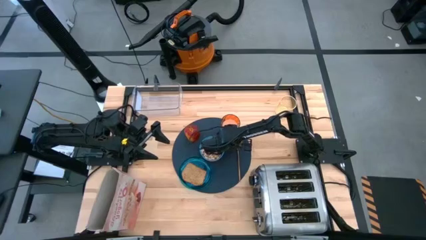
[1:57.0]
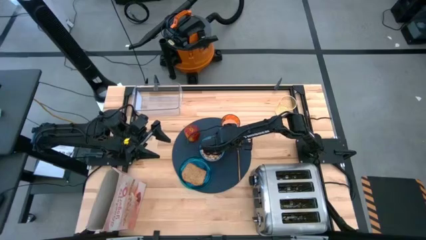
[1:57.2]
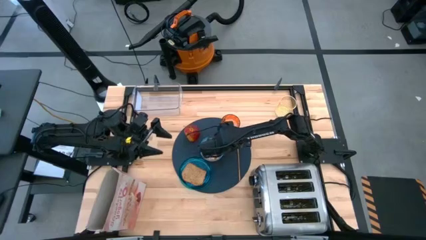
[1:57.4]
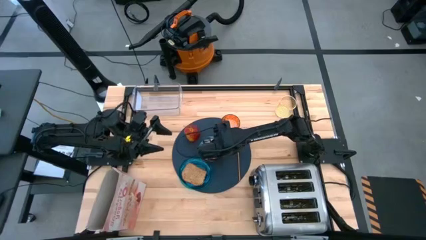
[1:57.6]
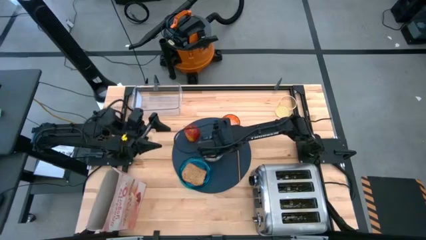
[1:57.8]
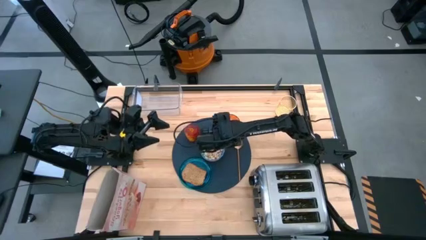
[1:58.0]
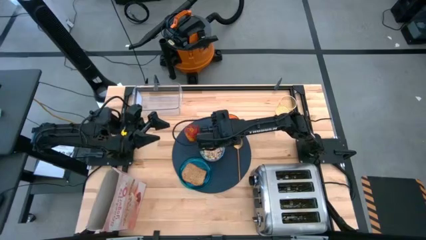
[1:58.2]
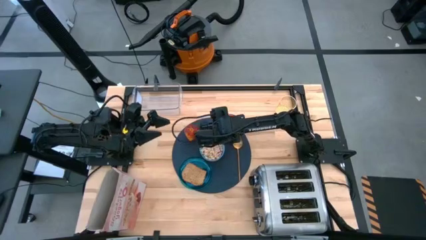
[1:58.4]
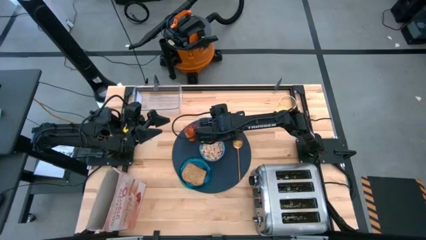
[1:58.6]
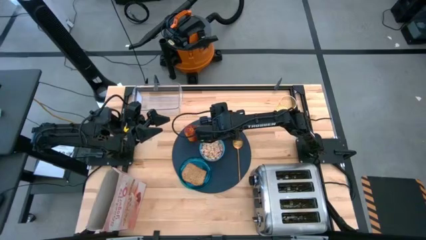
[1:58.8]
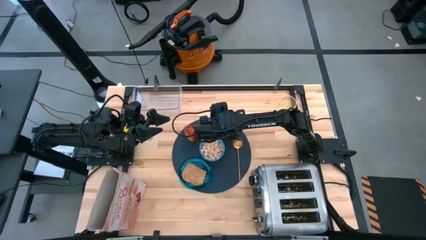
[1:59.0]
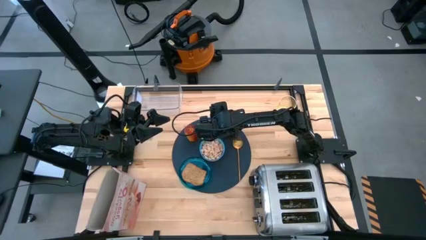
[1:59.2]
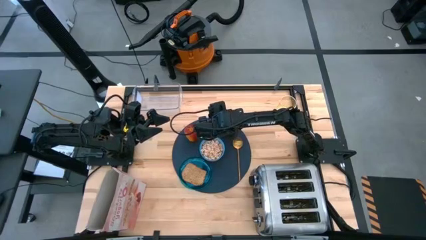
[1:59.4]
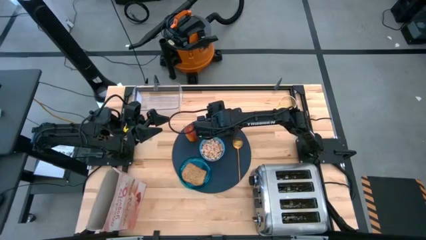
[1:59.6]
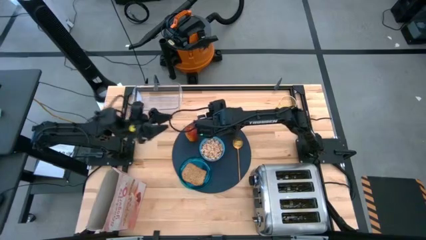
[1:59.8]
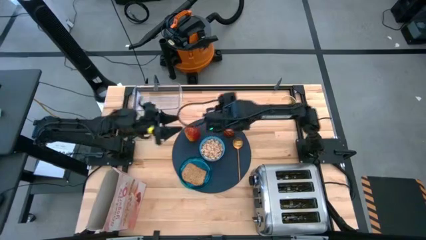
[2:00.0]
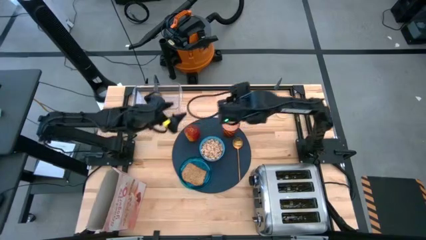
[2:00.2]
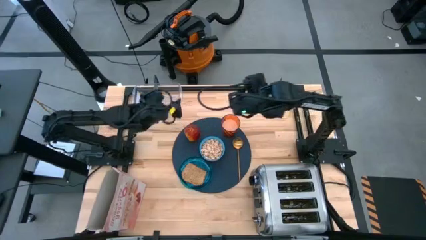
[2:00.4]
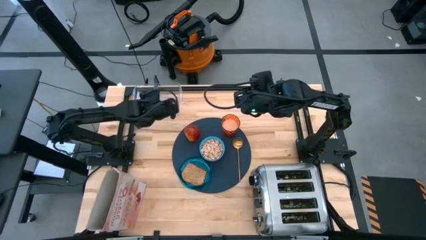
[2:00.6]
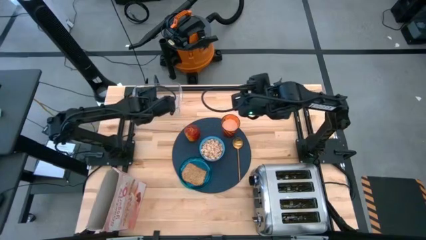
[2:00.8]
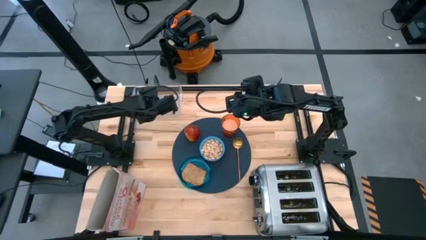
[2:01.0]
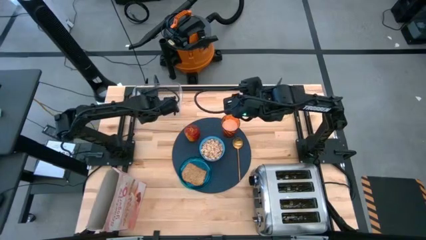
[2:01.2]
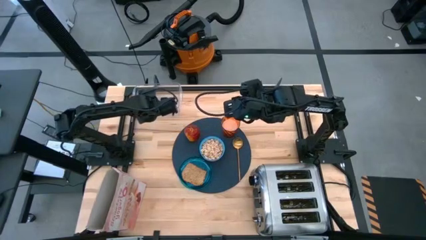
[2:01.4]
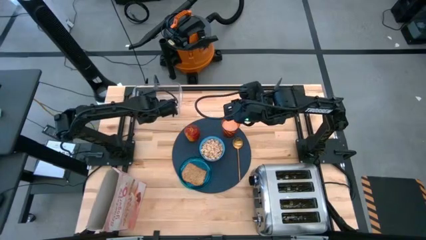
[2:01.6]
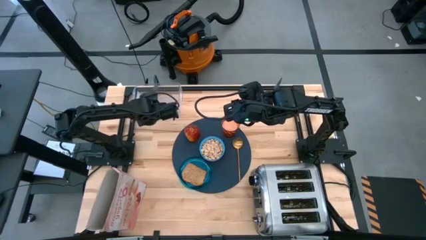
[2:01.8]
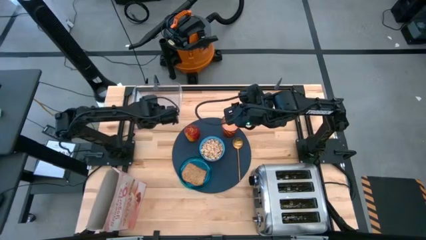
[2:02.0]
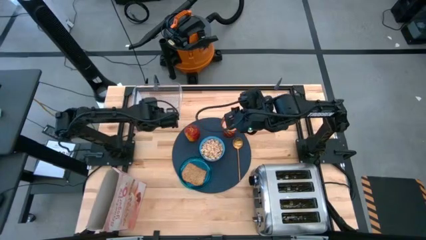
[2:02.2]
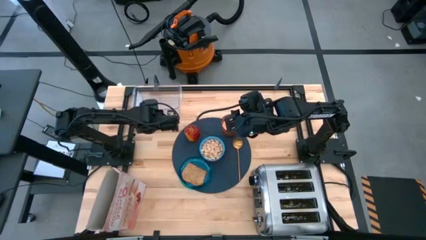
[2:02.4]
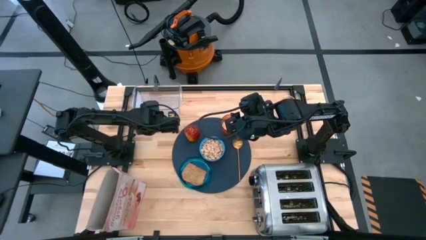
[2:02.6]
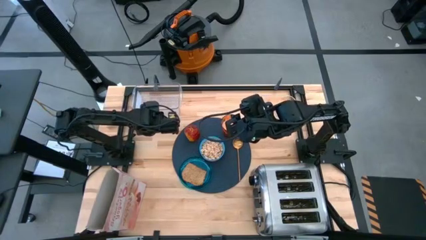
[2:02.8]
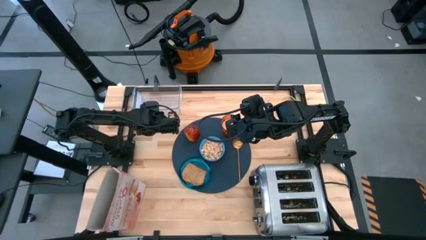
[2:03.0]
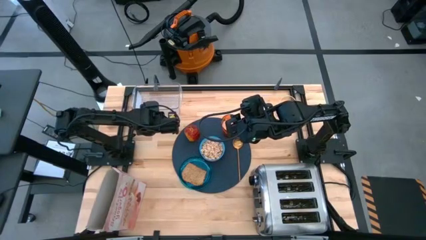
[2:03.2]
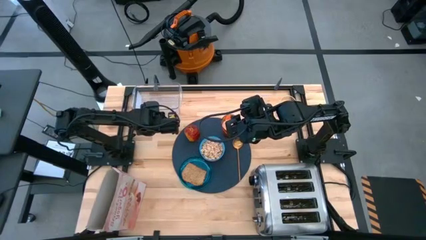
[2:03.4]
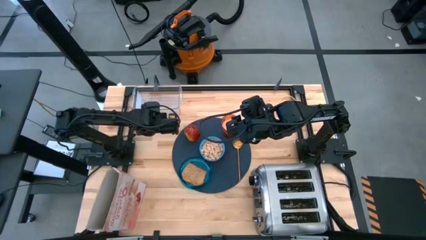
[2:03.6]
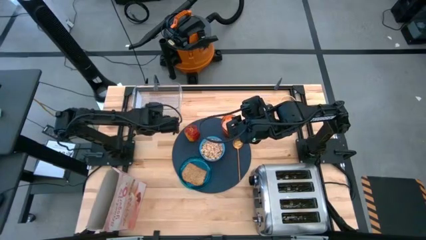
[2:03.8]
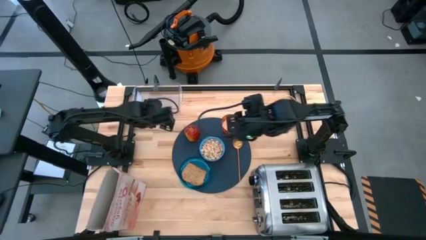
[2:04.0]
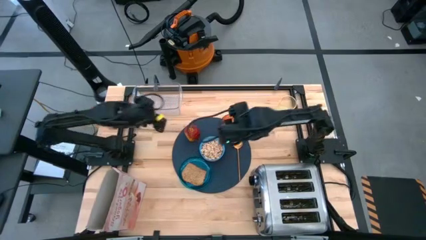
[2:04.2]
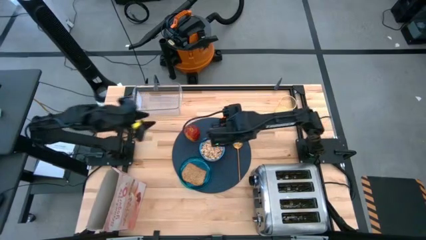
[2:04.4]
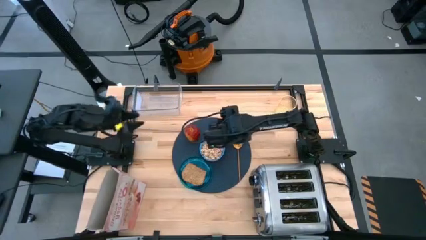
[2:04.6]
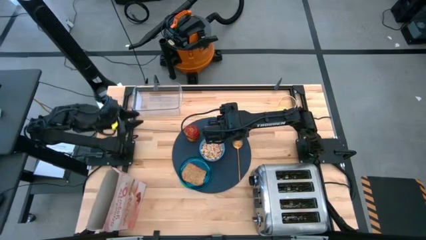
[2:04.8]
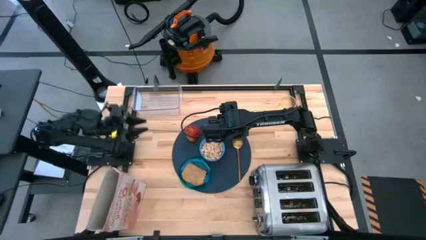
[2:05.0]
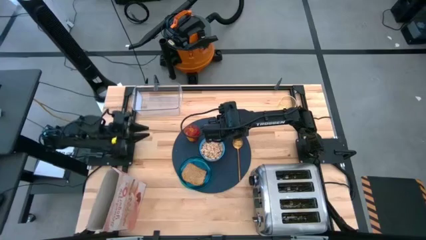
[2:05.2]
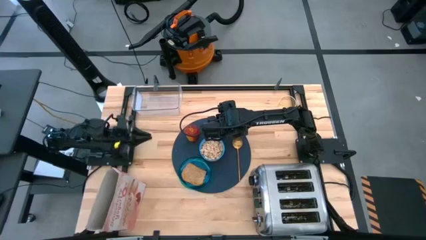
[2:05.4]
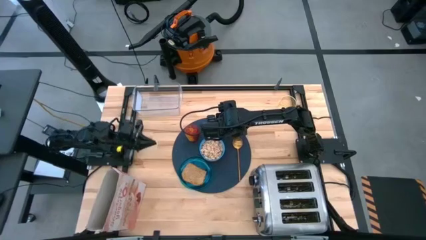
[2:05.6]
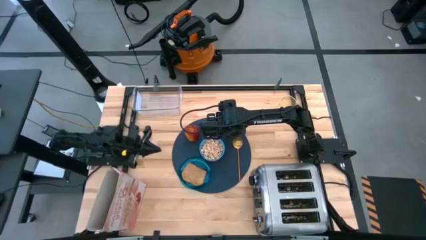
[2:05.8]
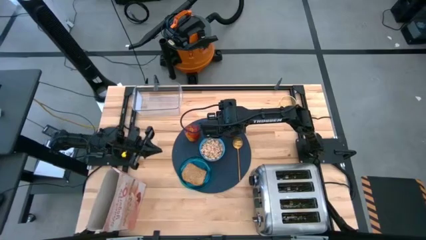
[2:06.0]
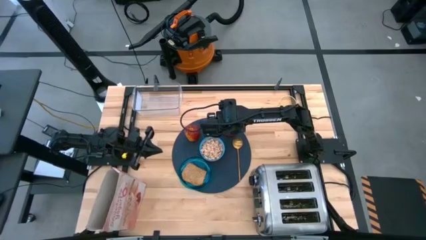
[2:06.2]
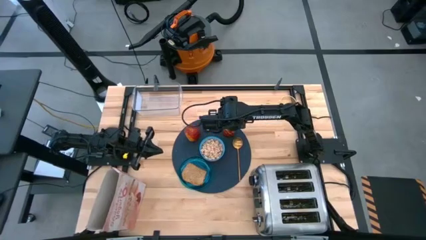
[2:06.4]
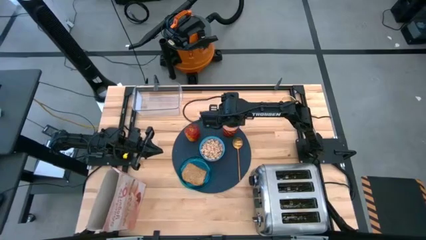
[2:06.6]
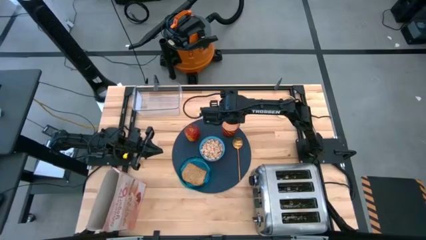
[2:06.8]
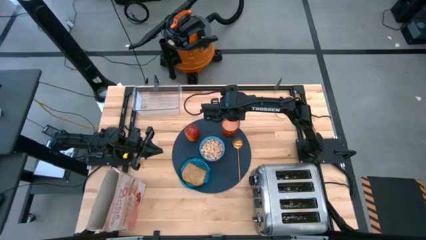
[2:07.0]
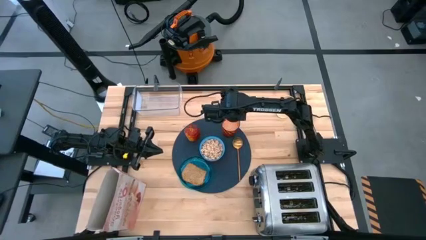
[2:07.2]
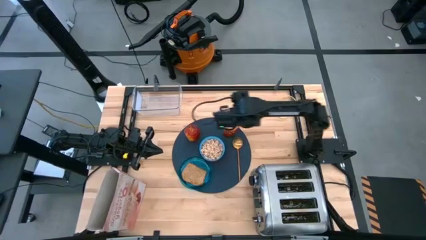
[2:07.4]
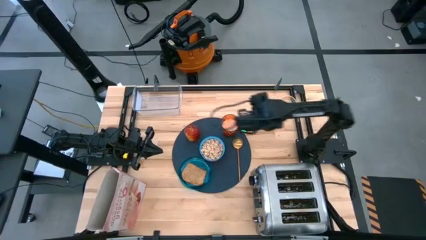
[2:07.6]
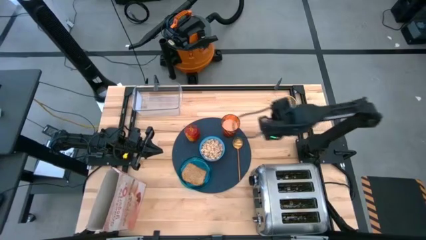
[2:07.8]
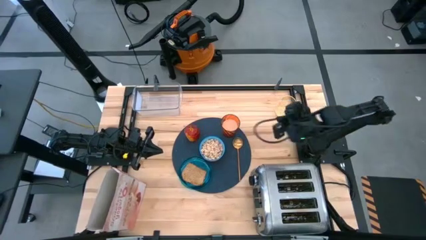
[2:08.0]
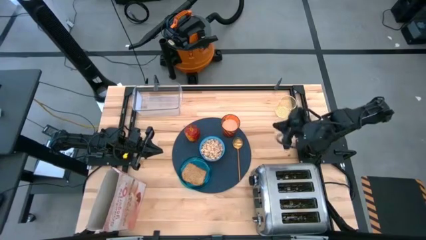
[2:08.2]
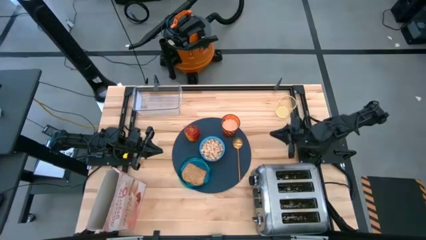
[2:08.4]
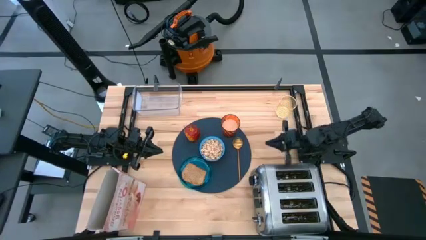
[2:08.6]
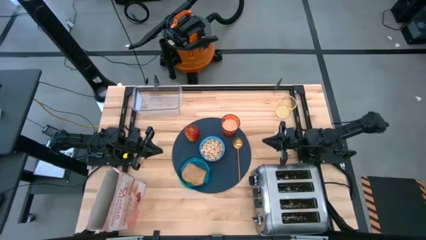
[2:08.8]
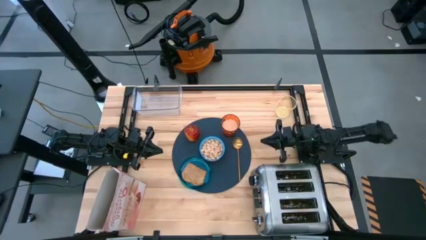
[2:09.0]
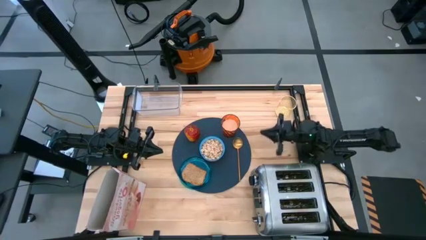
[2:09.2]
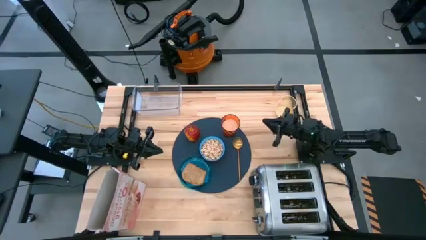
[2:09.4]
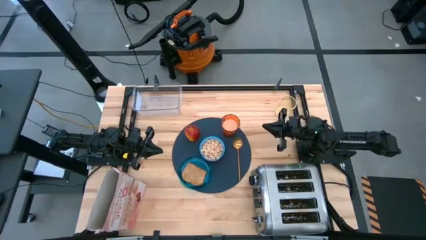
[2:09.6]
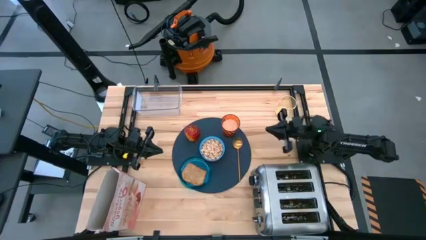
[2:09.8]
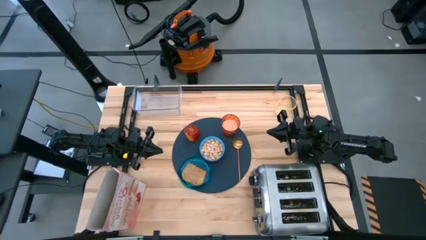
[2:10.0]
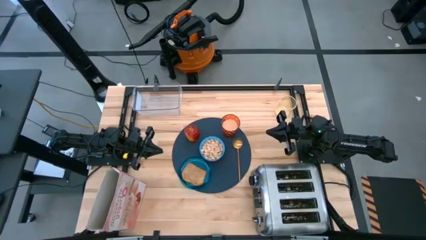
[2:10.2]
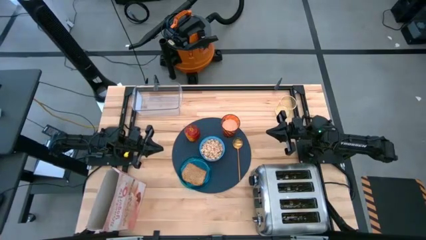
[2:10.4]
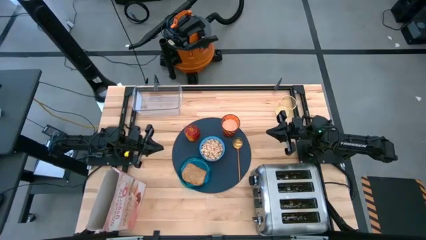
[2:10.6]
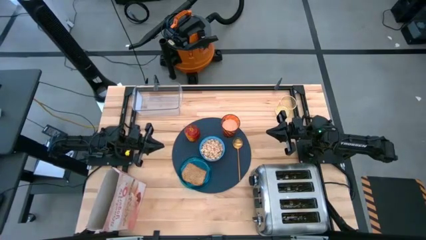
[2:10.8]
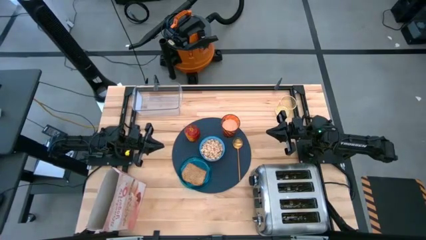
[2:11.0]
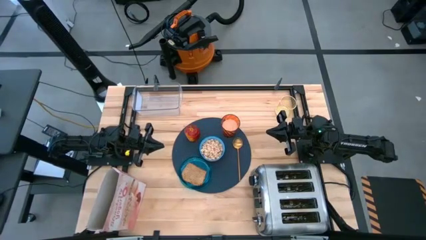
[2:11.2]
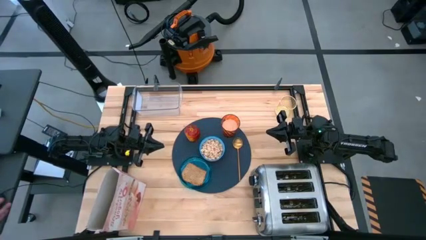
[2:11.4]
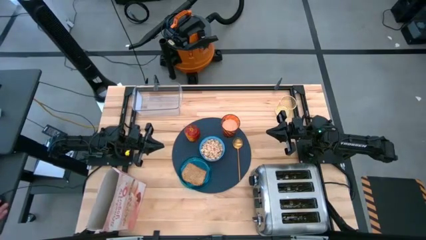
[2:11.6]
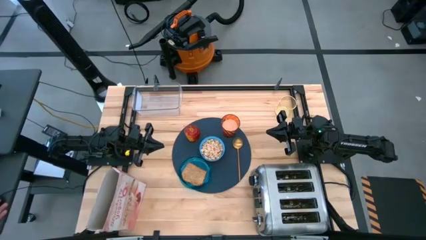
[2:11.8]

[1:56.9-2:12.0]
Task: Arrange a breakfast setting
Return to Home Position

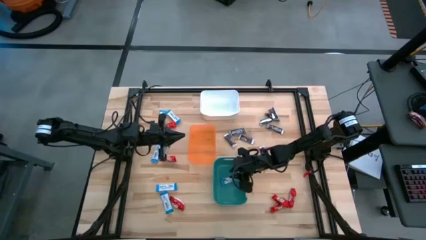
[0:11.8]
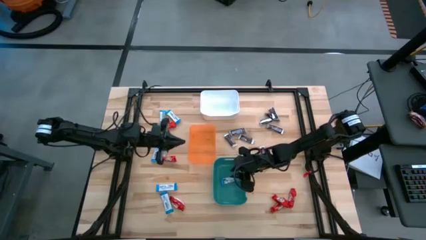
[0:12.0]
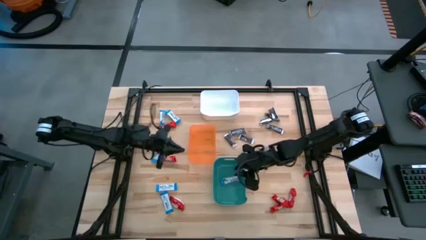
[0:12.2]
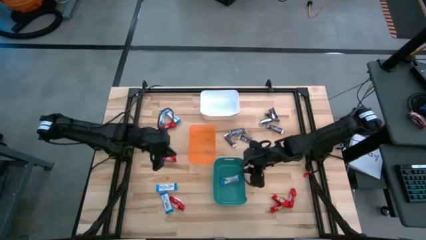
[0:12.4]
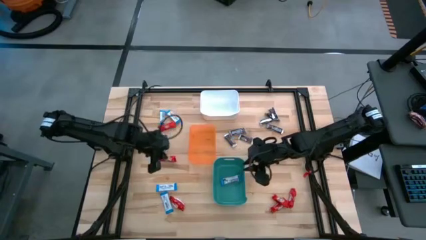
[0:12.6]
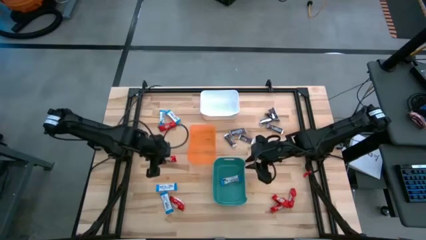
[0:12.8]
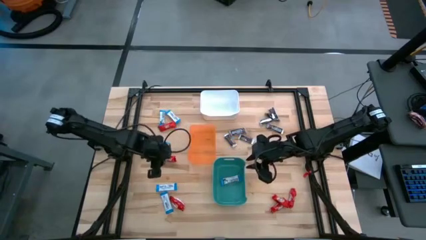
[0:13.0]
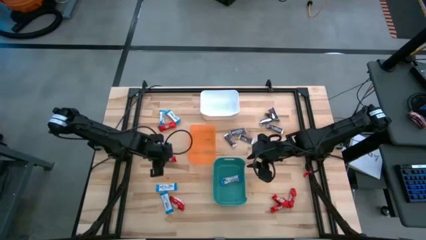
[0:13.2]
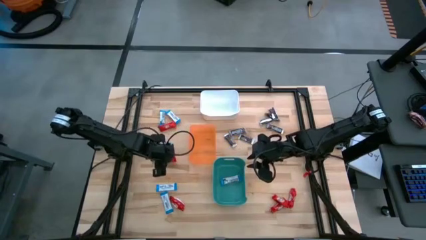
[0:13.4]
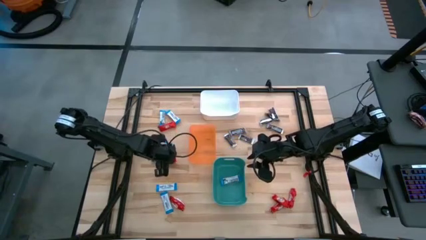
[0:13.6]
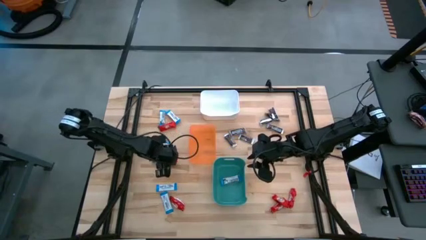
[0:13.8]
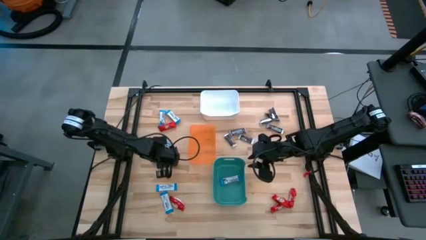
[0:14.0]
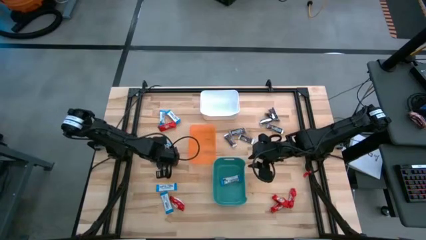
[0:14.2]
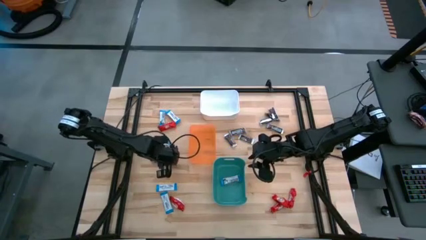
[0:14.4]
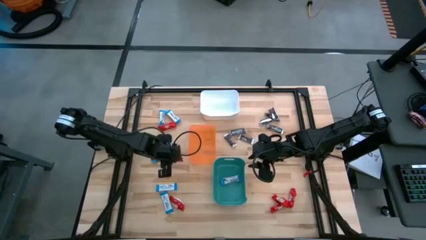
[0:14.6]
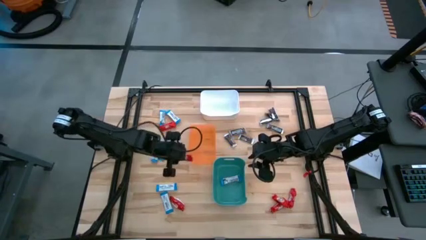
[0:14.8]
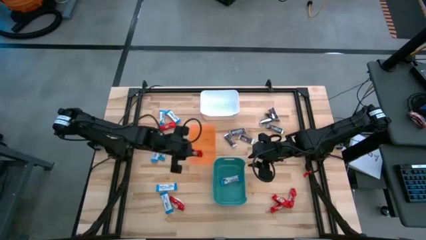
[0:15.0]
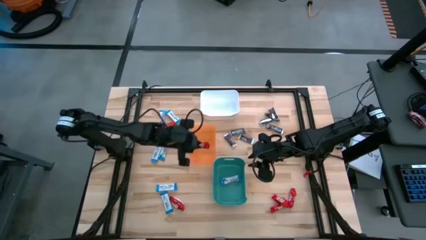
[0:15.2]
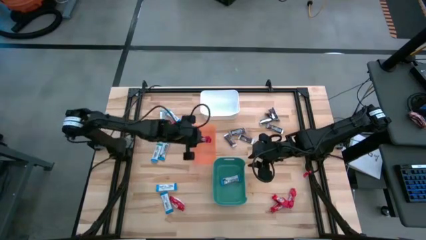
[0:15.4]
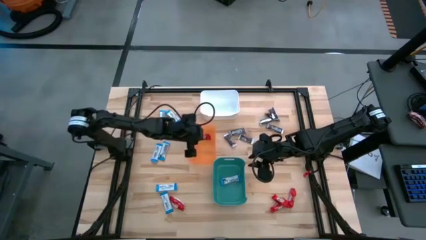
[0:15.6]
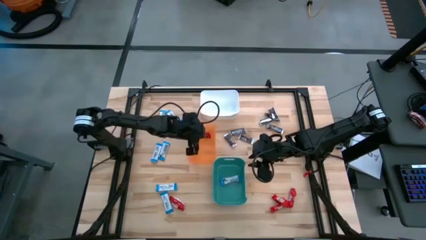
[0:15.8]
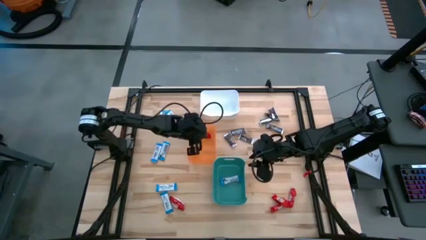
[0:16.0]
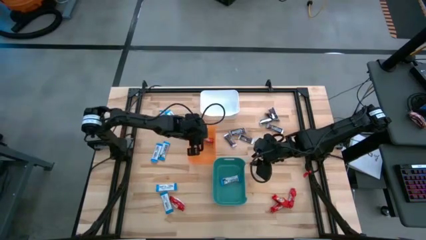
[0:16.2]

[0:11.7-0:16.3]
Task: Sort candy
Put the red chocolate bar into the orange bin
